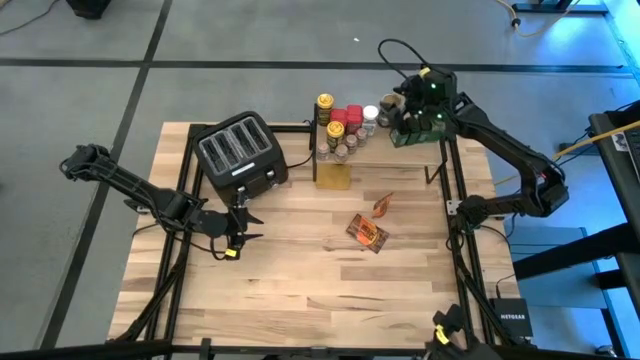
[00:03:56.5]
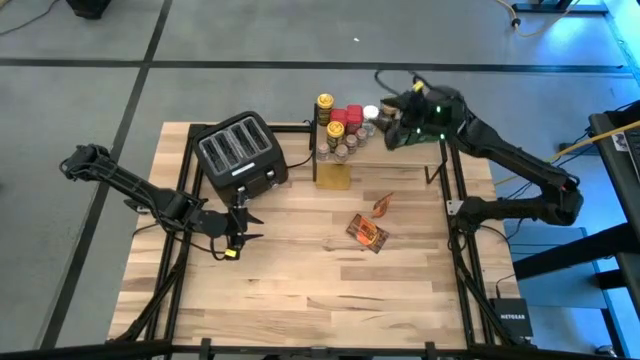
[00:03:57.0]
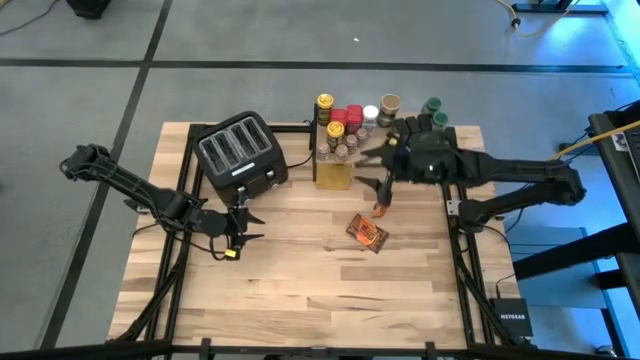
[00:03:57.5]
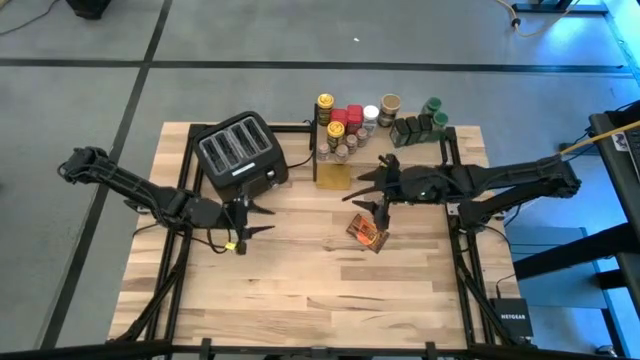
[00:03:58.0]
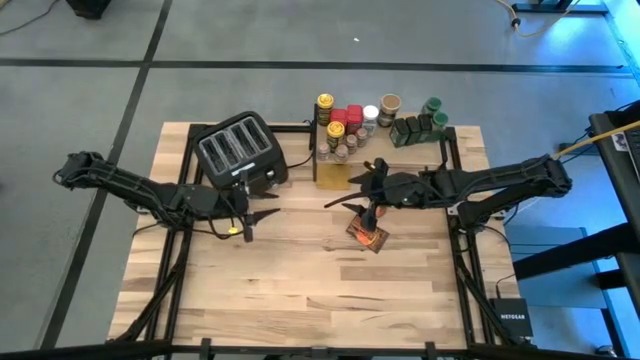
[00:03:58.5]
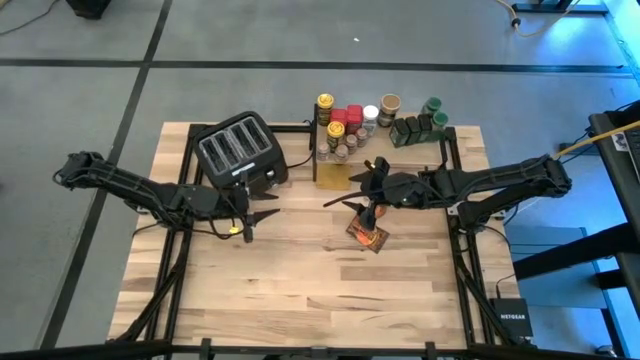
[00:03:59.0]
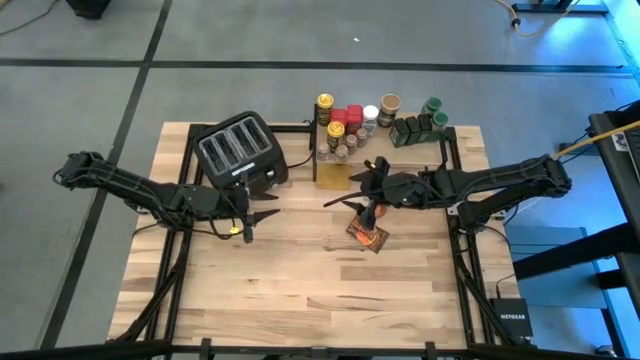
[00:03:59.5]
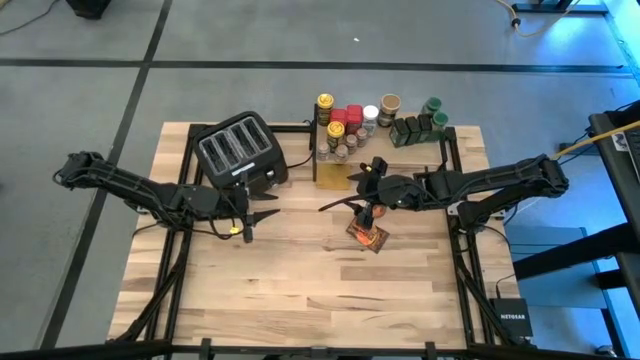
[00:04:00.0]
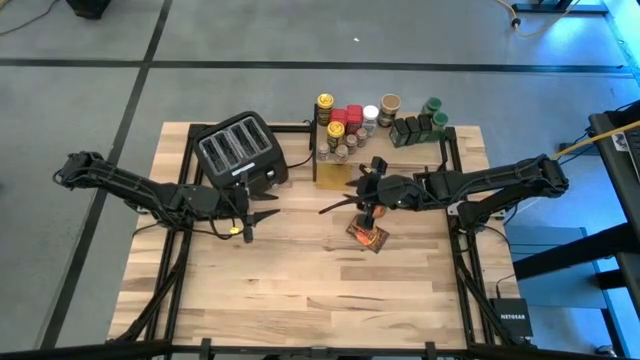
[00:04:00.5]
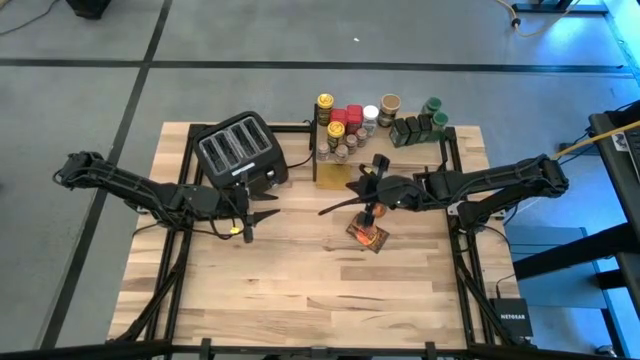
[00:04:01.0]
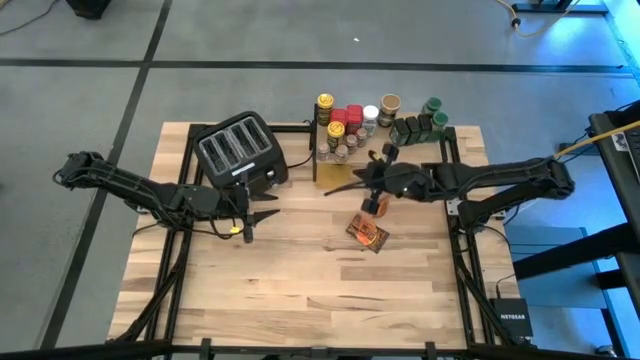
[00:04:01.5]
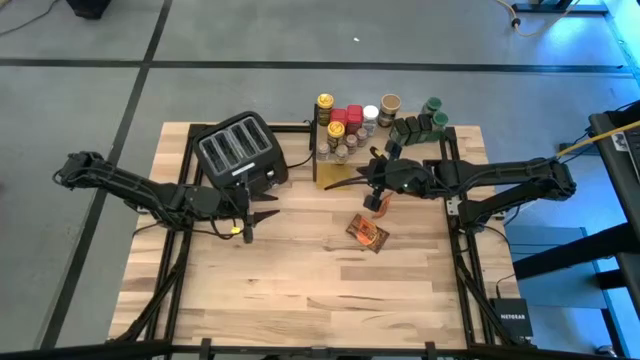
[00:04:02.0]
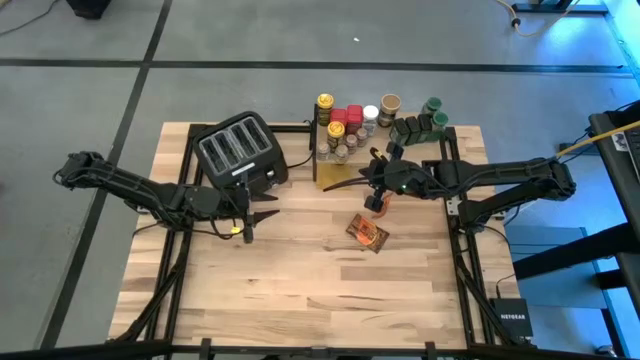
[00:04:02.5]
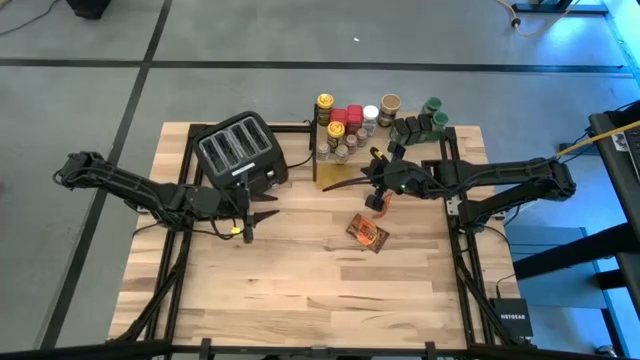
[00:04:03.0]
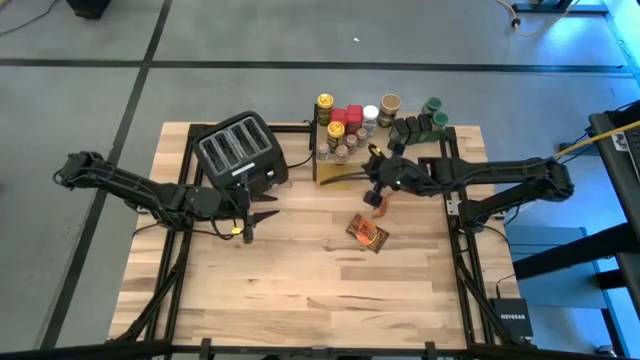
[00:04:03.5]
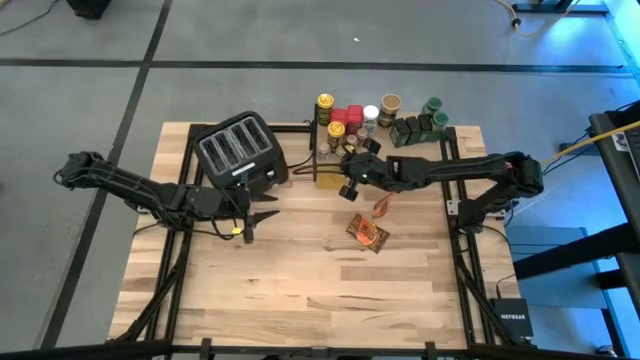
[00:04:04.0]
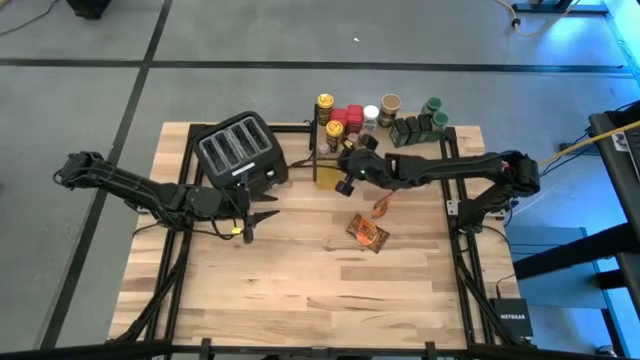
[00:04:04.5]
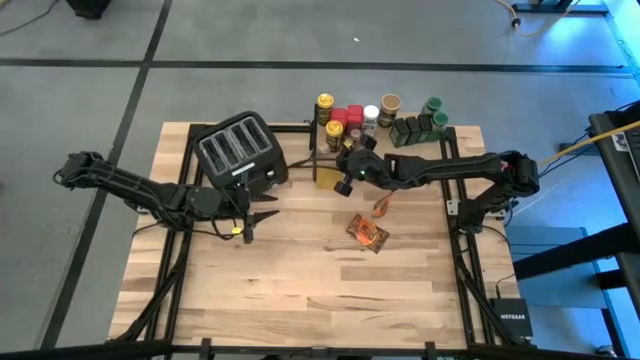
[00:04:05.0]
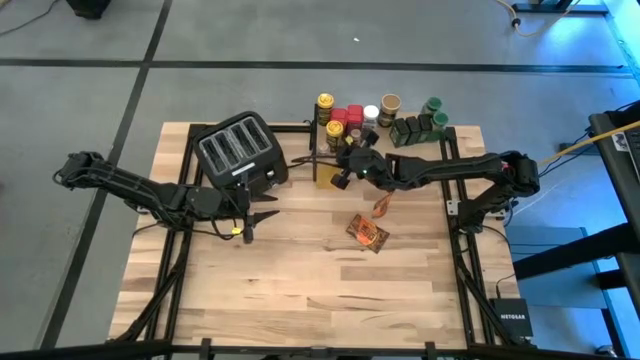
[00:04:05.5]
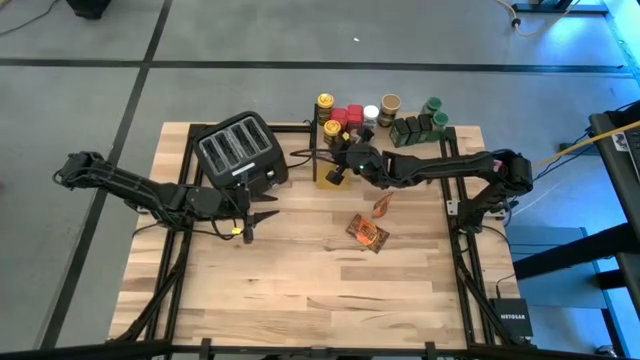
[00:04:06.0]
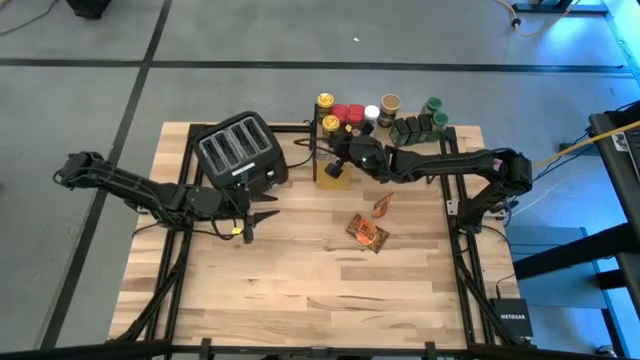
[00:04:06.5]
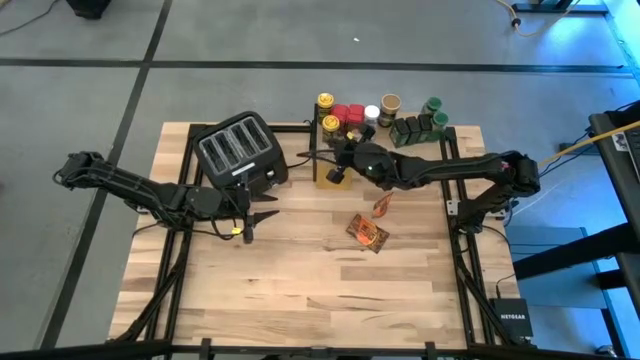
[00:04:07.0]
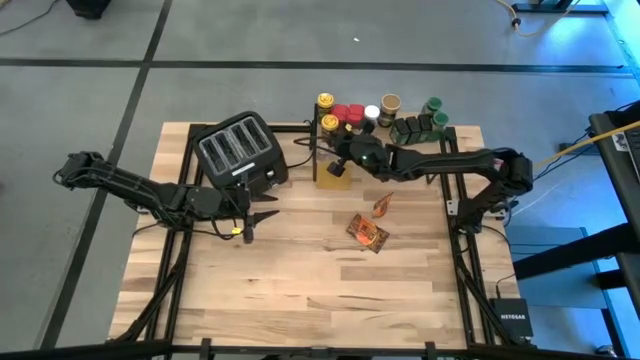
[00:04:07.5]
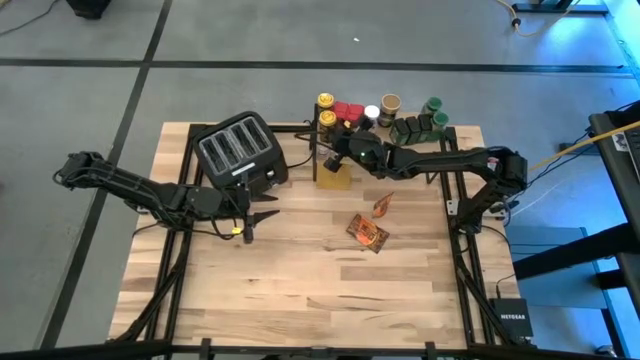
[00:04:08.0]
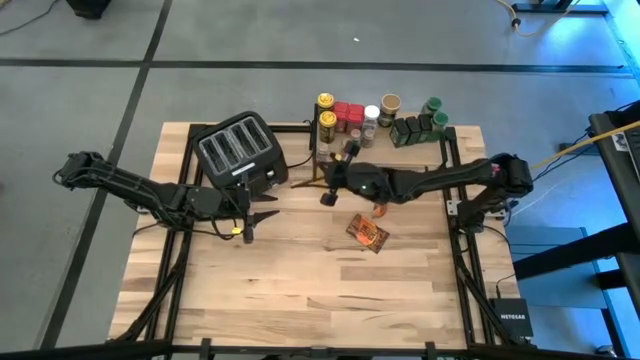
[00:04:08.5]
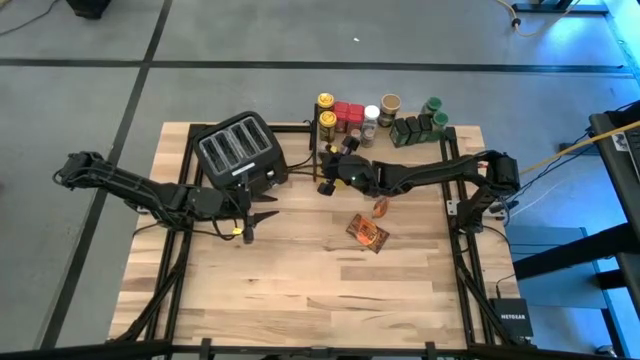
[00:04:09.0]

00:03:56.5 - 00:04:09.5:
Task: Shelf spices
Adjust the seasoning bottles on the shelf

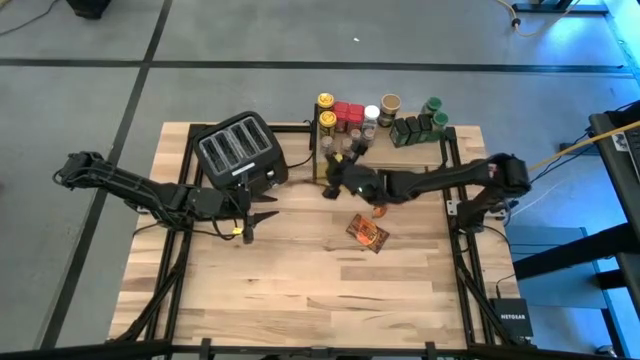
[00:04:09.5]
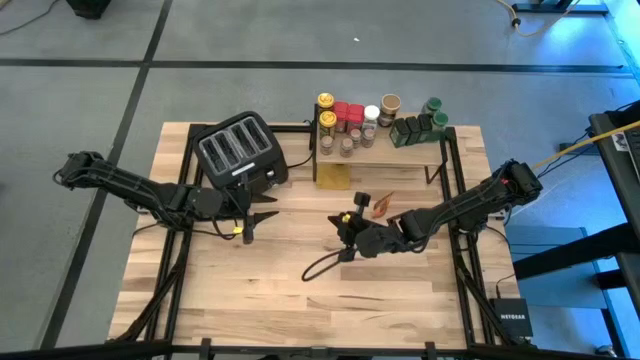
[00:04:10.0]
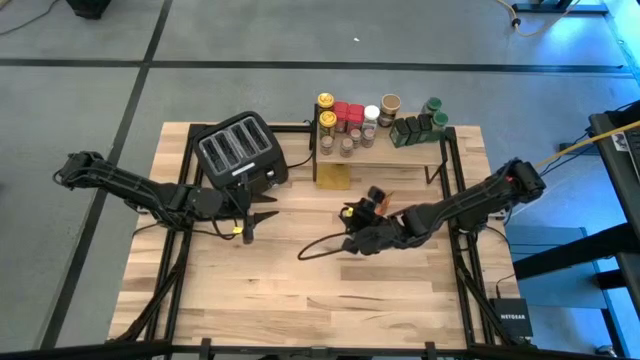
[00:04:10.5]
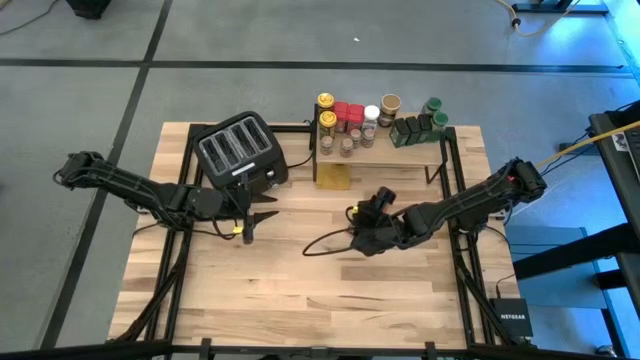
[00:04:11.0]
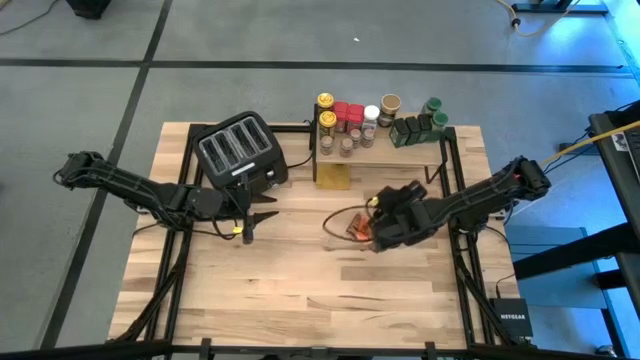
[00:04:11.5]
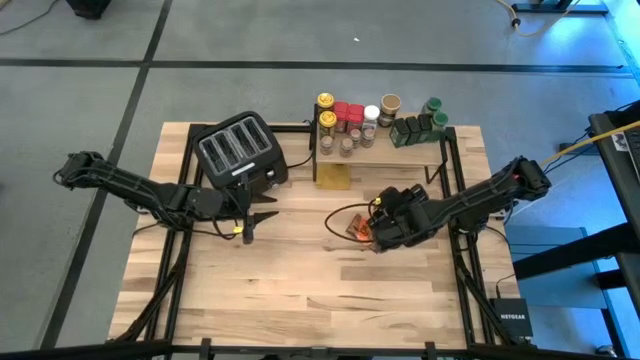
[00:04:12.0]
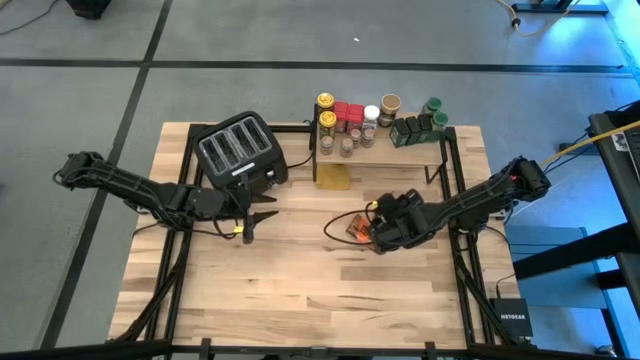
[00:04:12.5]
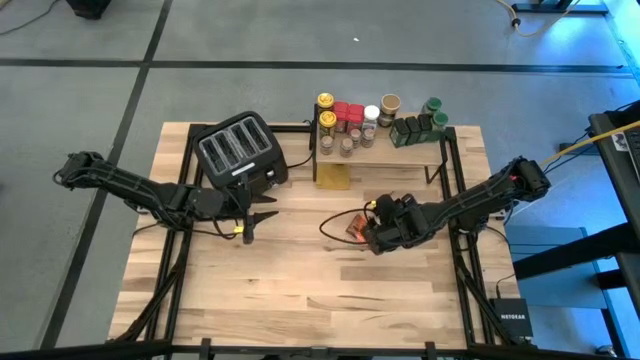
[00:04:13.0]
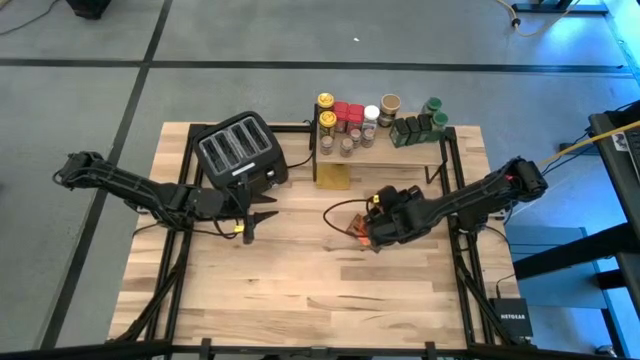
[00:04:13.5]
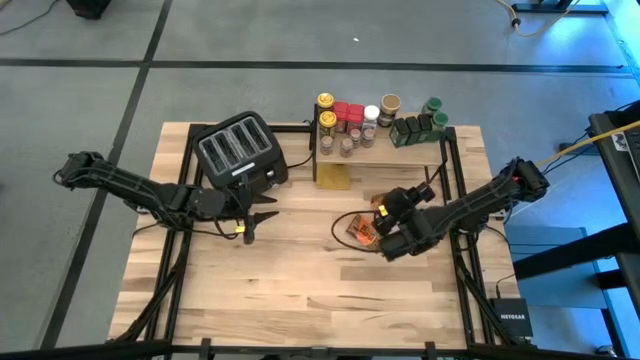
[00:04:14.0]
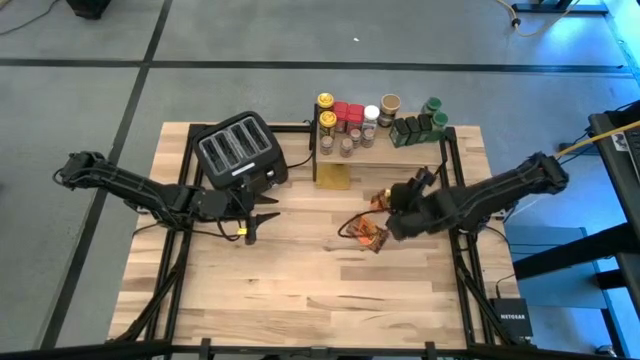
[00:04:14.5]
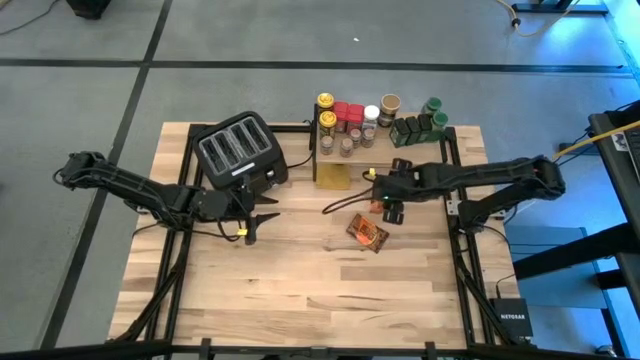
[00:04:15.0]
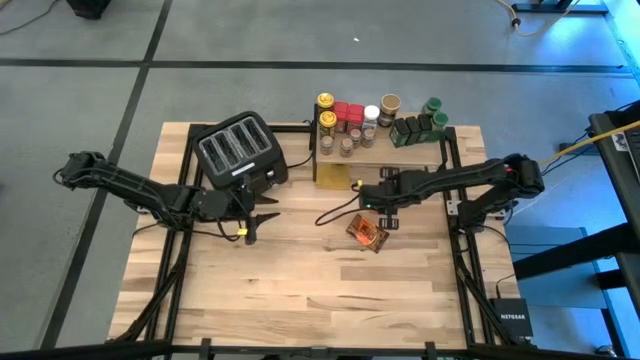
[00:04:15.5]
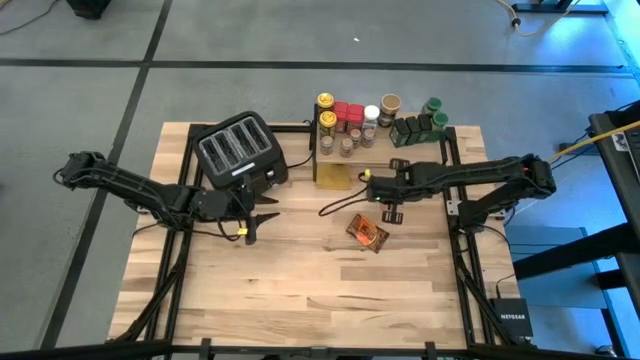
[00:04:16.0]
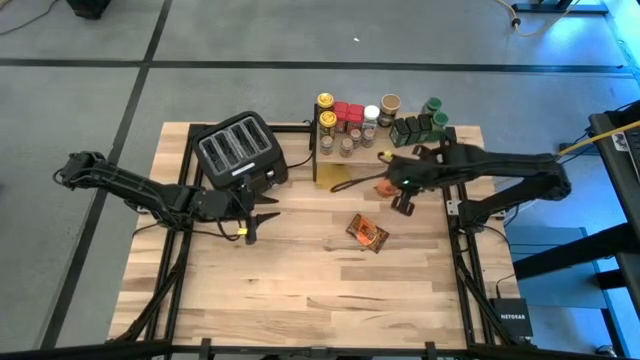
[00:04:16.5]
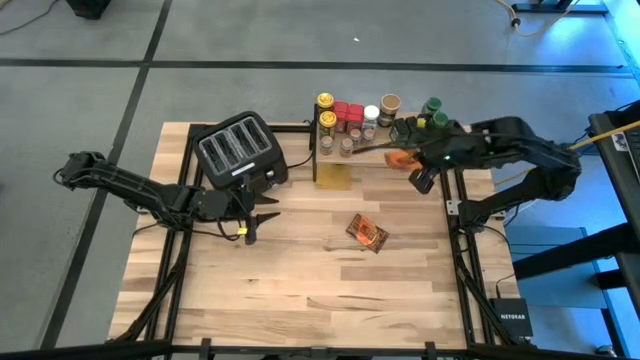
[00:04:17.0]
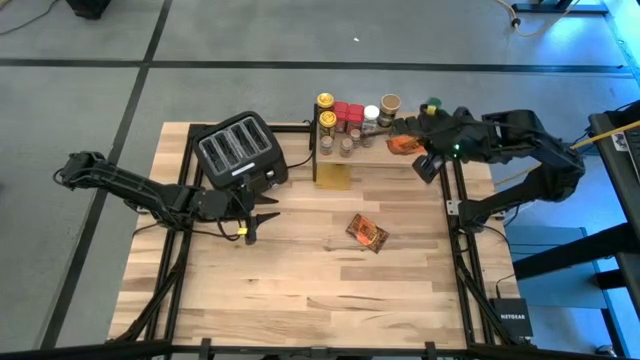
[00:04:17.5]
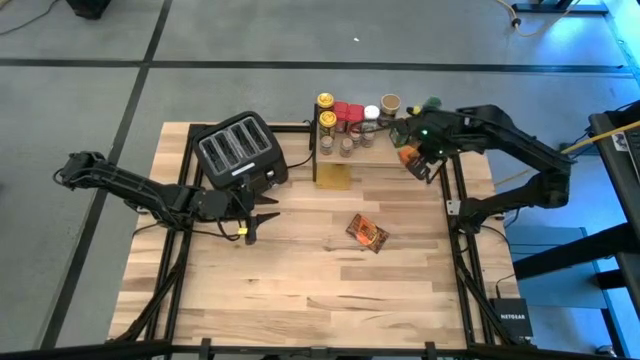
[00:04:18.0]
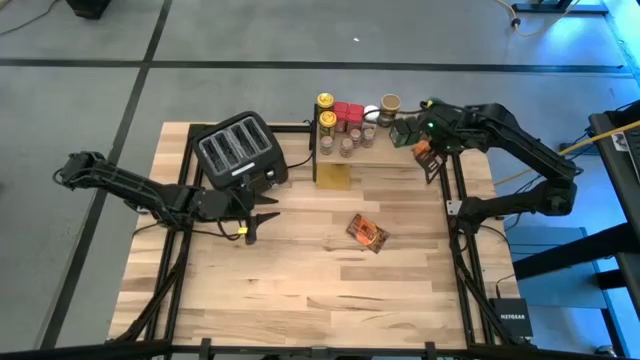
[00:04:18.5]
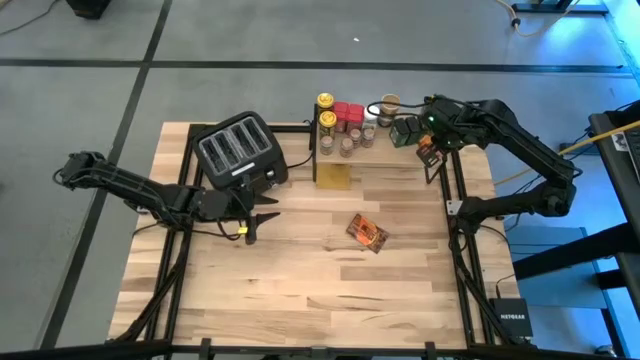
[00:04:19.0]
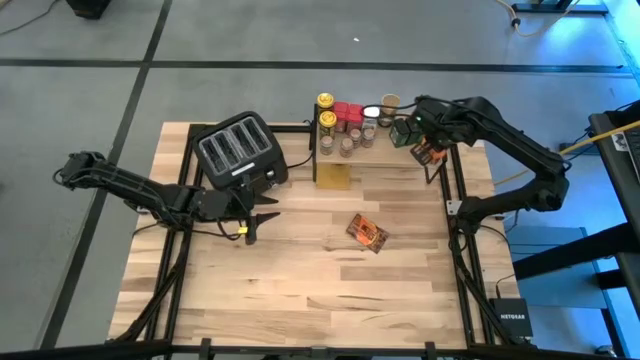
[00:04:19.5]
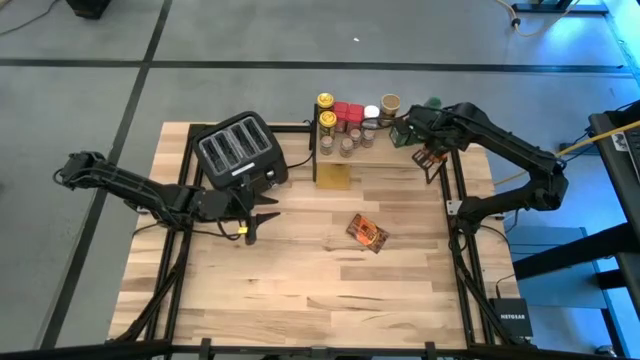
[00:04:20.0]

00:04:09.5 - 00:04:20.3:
Put the orange seasoning pack on the shelf
